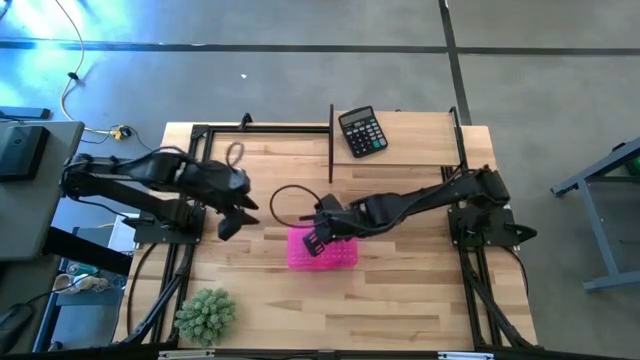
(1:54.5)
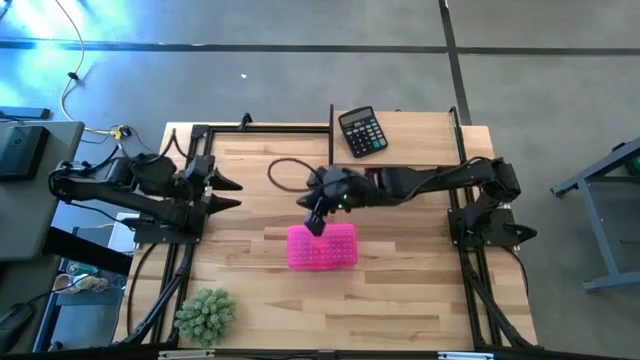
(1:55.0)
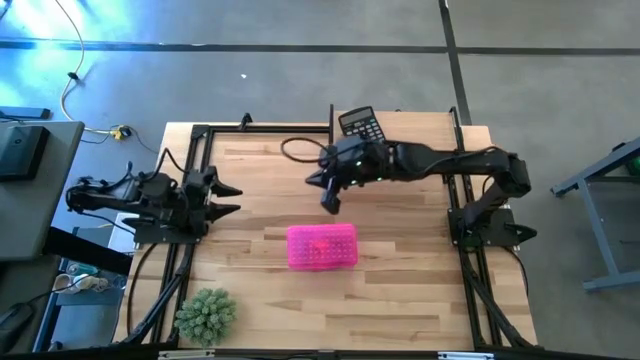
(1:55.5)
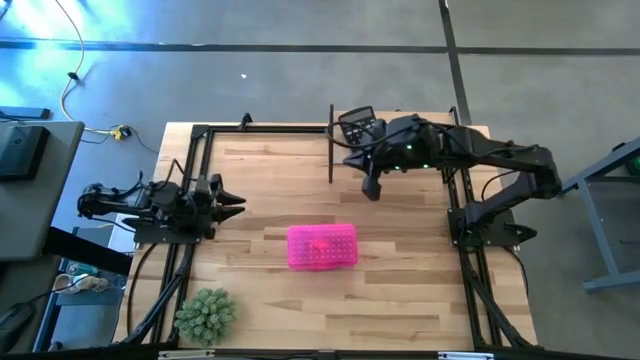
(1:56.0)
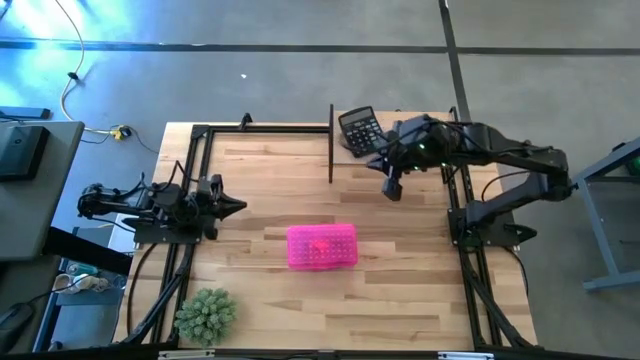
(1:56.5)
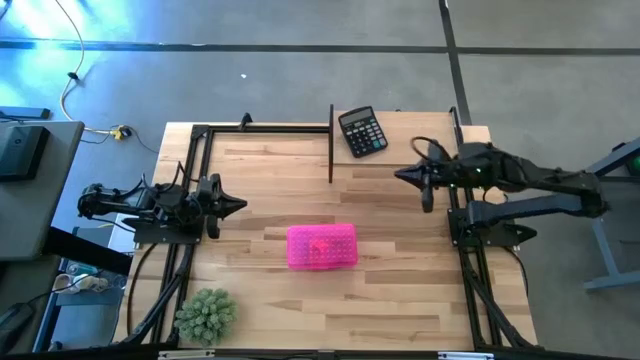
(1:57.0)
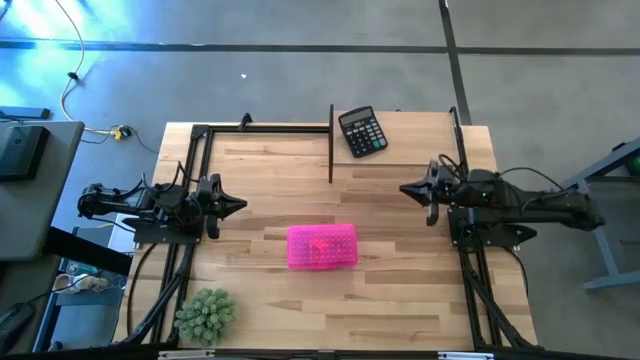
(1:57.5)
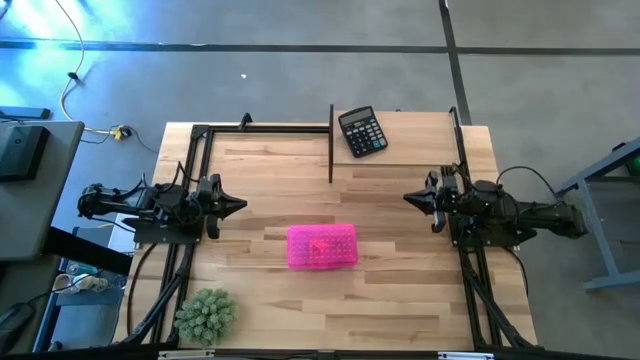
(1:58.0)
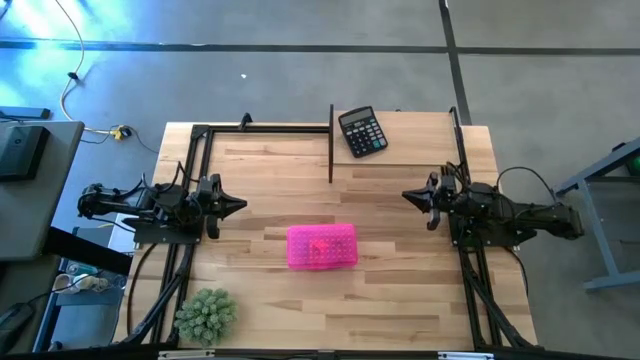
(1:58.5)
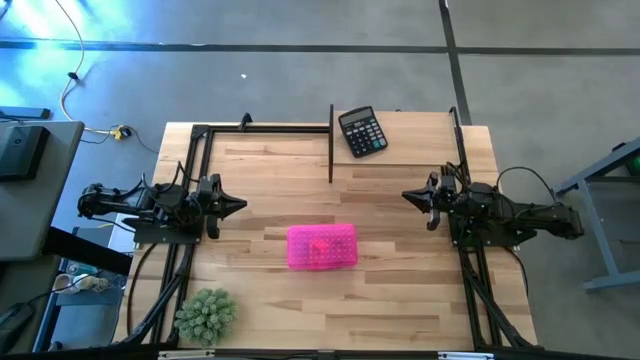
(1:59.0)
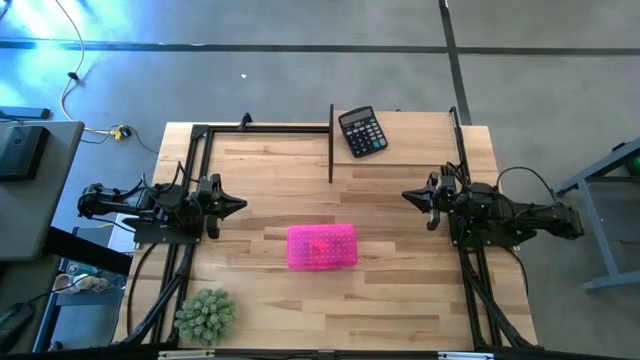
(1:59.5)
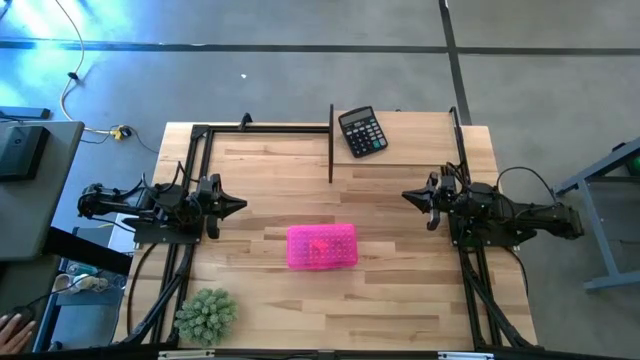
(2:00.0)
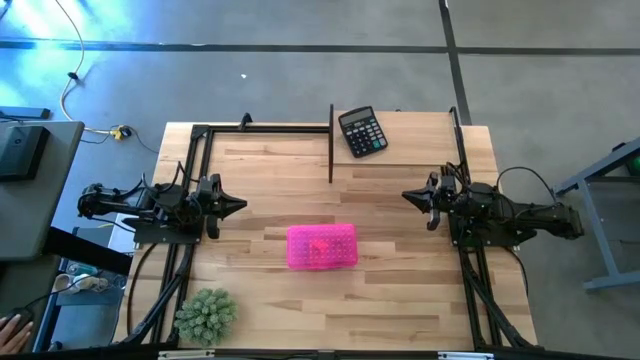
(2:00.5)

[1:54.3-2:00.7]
Task: Pack school essentials
Return to Home Position

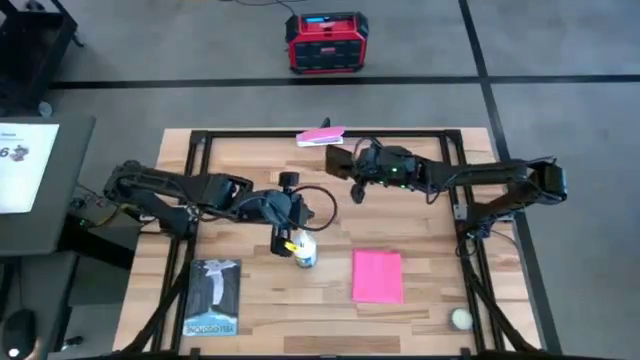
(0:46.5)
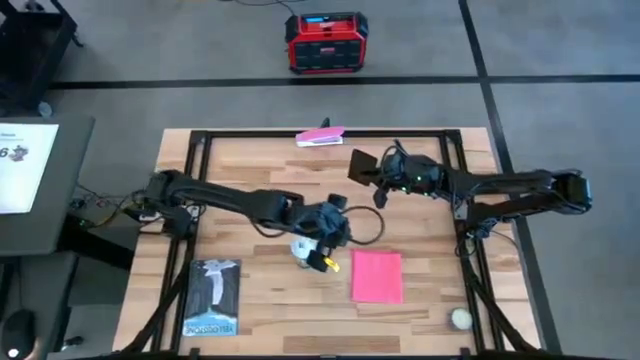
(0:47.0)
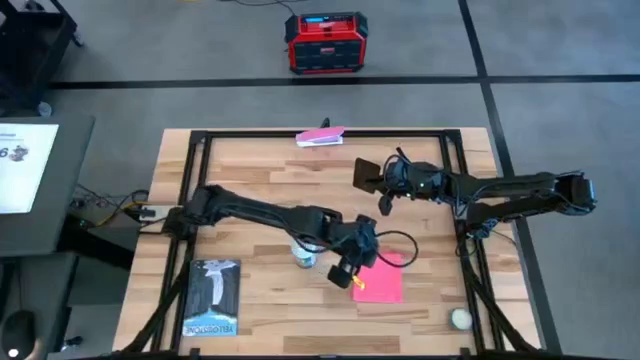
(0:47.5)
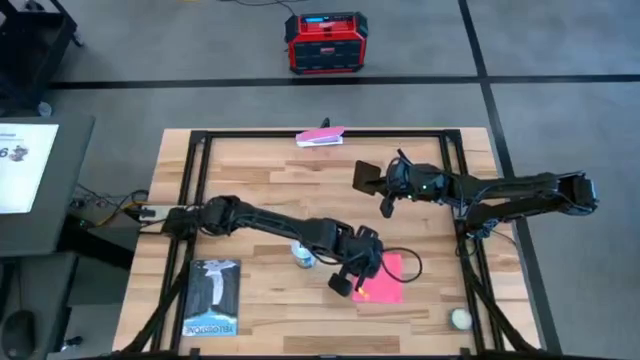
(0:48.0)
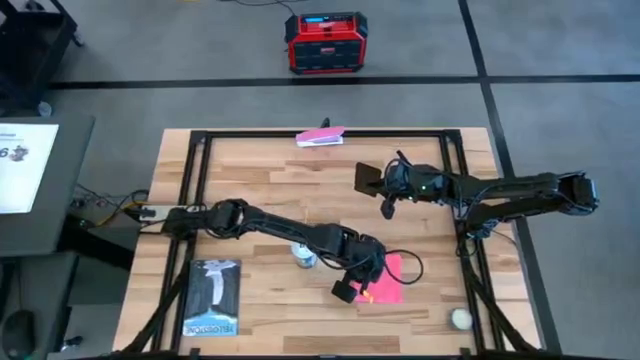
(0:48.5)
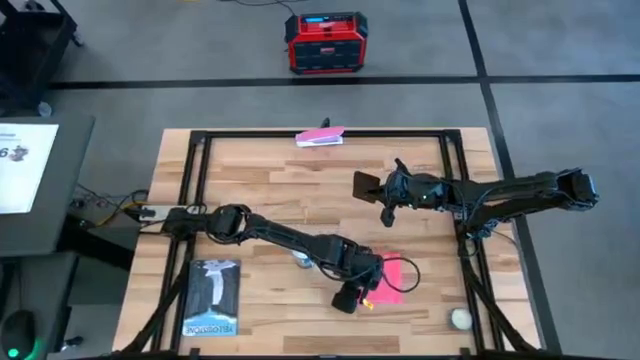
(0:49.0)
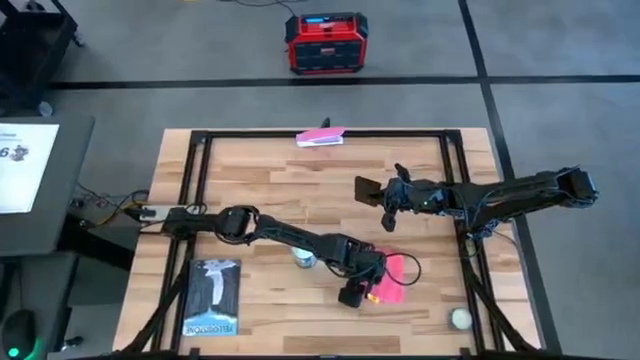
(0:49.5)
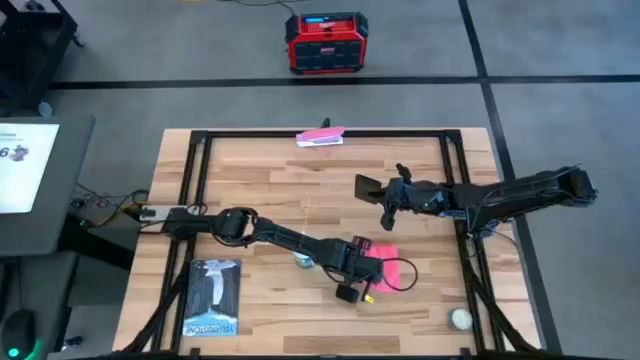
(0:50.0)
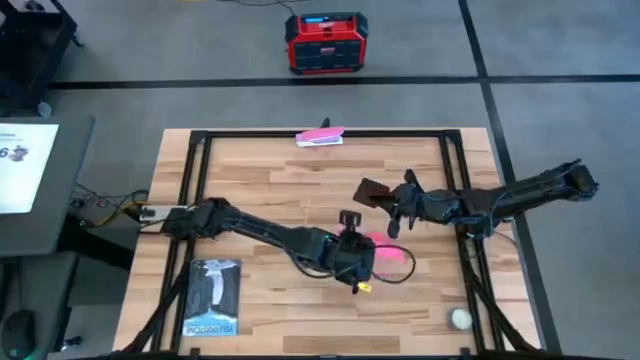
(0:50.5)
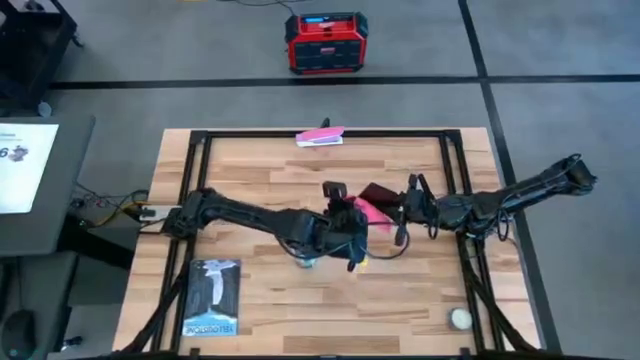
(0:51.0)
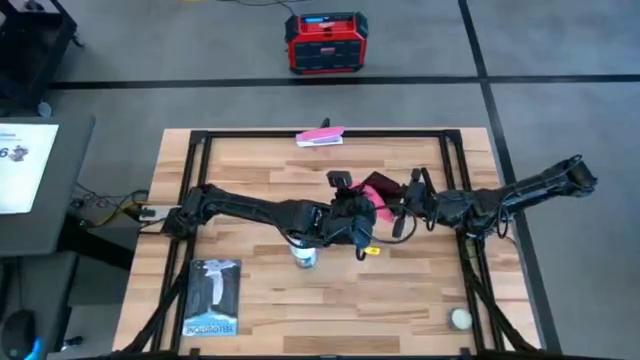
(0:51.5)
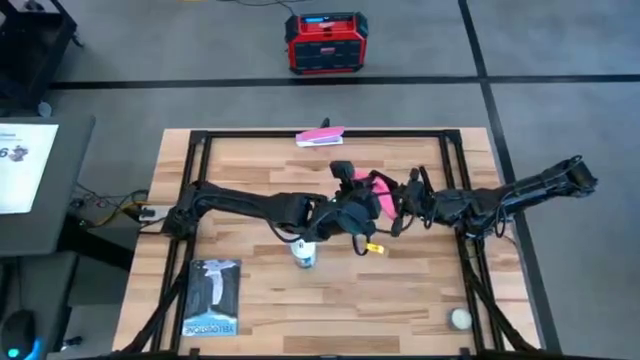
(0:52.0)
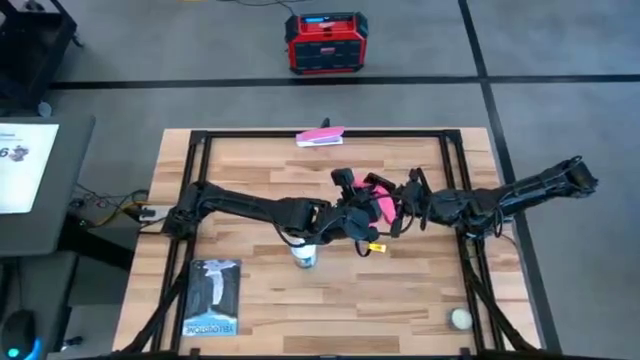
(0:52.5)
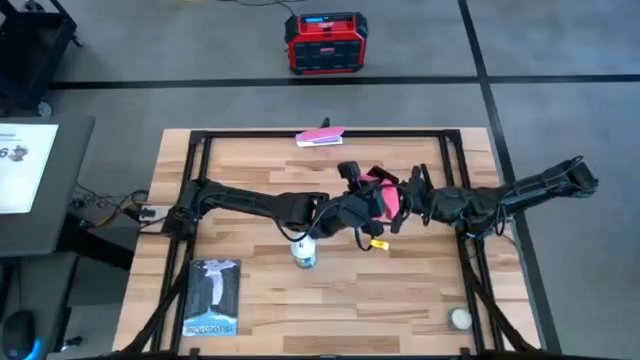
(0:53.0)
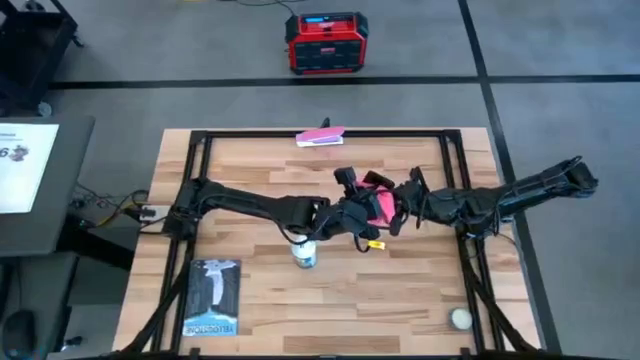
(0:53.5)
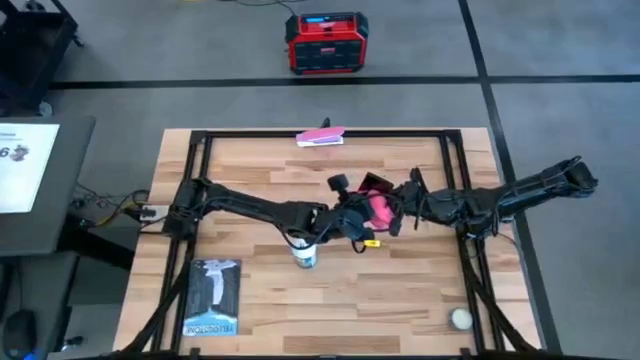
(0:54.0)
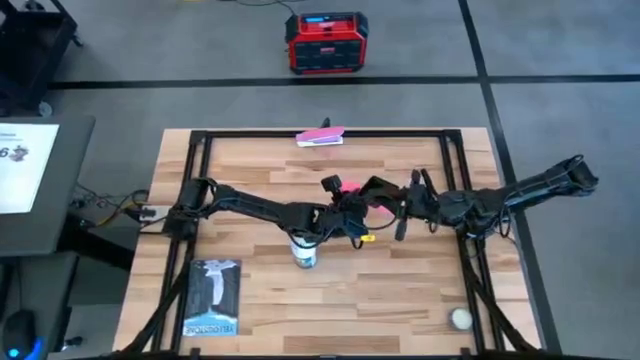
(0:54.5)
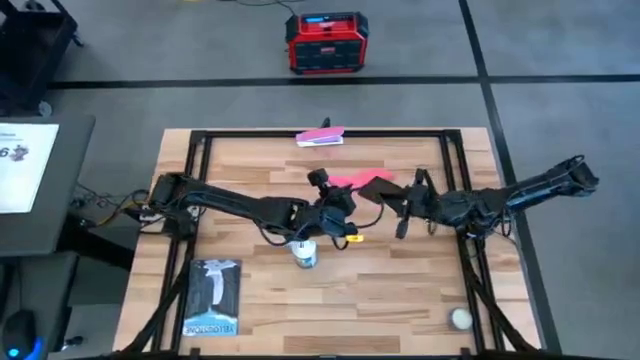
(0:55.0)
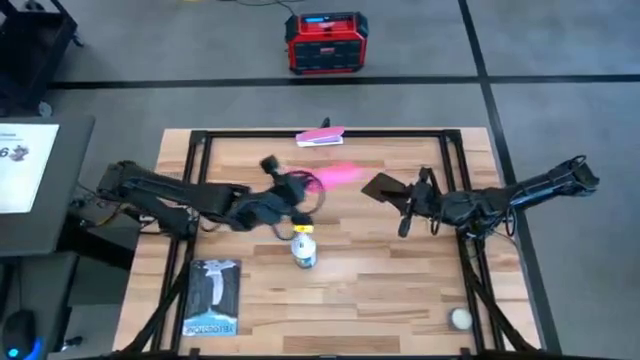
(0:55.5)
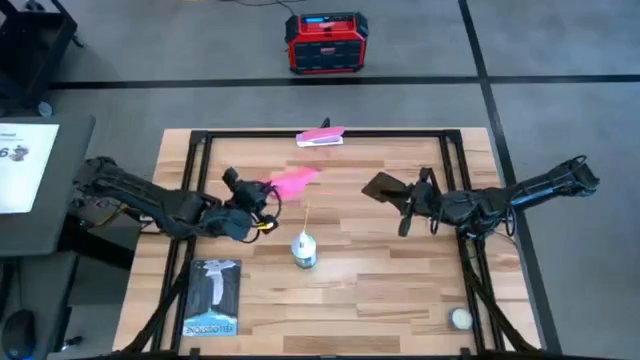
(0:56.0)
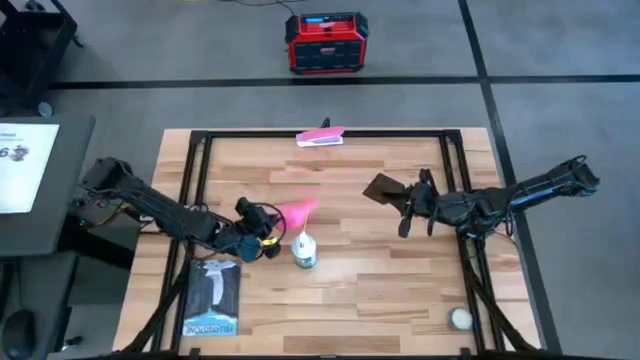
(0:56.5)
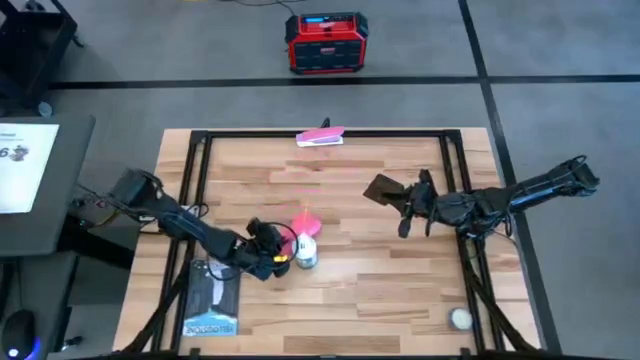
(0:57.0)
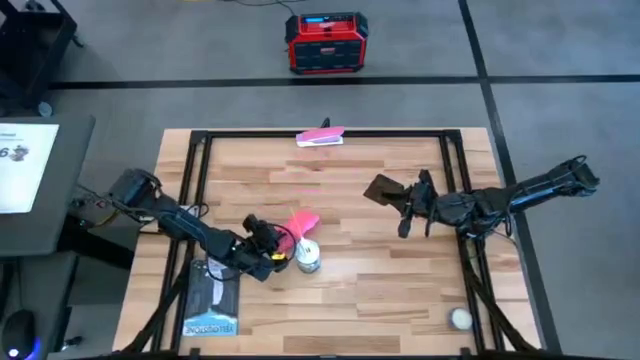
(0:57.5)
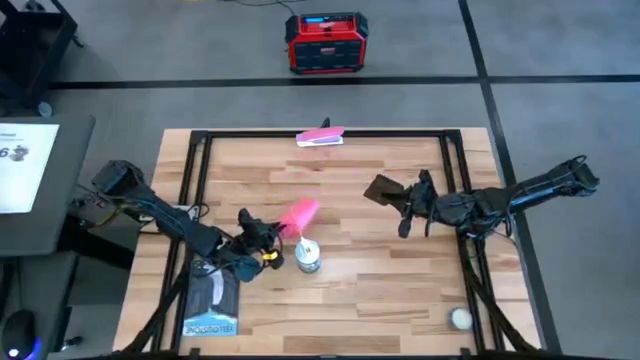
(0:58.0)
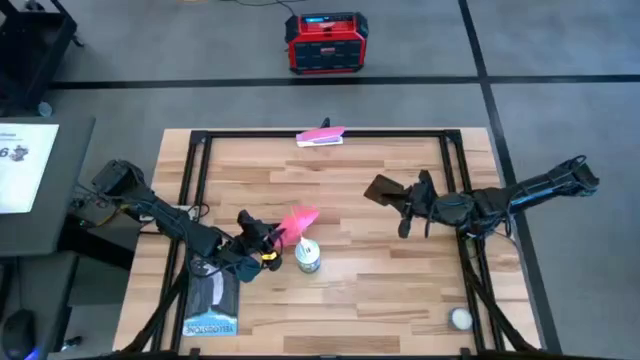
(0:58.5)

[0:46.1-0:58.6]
Task: Apply microfiber cloth
Wipe the black cellphone using the pink microfiber cloth
